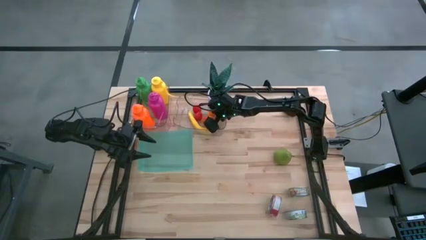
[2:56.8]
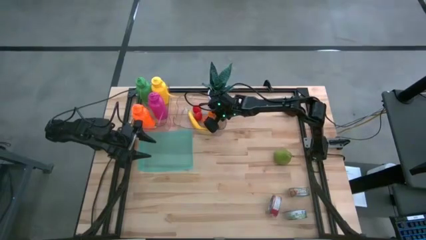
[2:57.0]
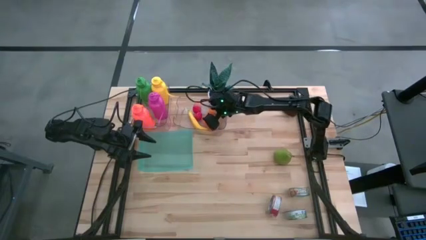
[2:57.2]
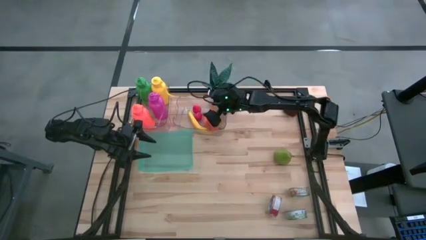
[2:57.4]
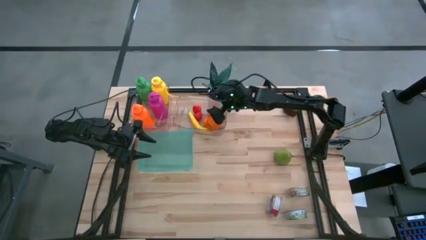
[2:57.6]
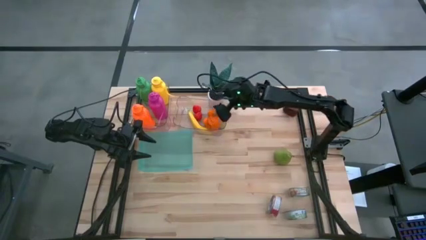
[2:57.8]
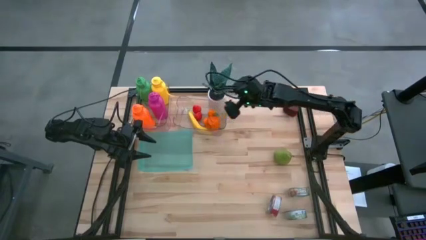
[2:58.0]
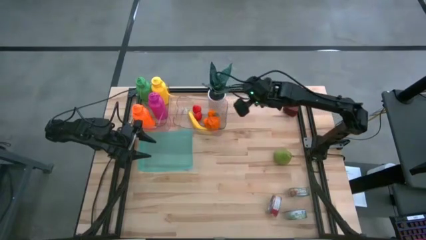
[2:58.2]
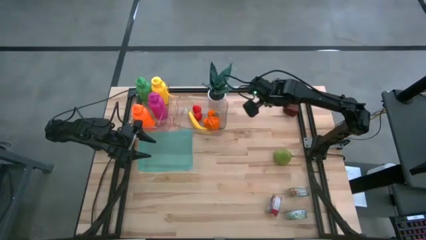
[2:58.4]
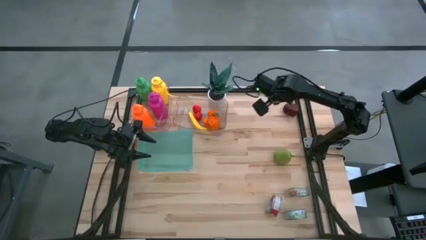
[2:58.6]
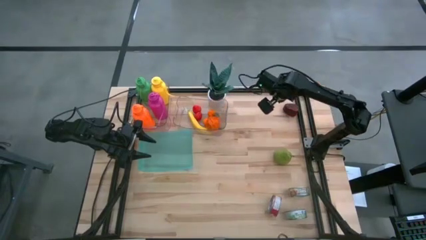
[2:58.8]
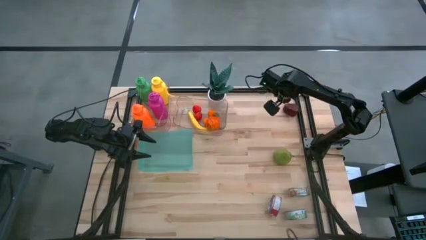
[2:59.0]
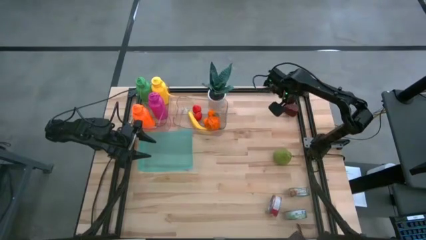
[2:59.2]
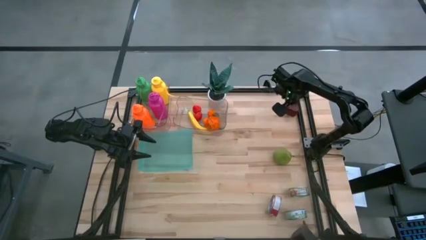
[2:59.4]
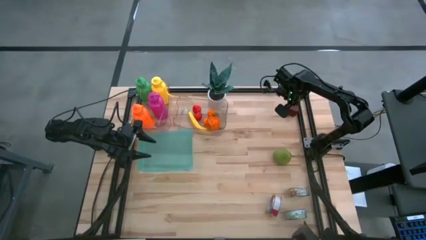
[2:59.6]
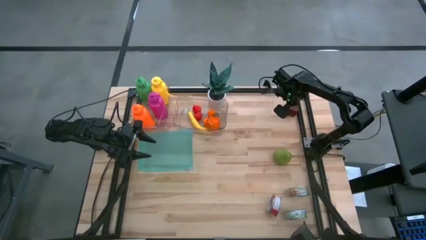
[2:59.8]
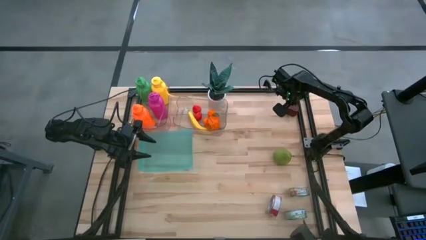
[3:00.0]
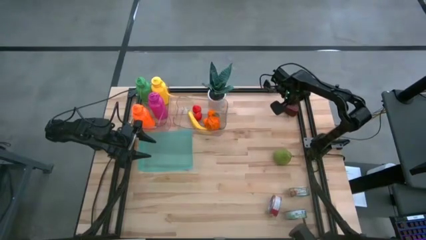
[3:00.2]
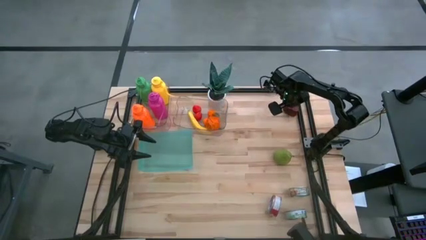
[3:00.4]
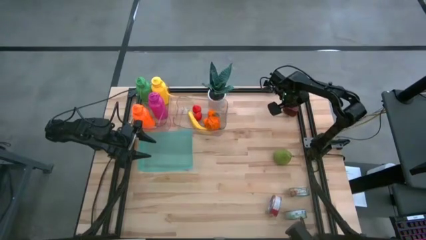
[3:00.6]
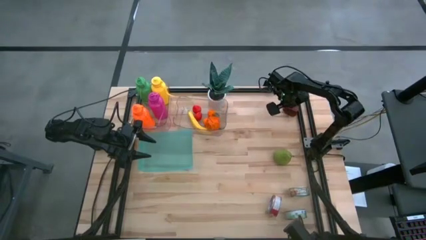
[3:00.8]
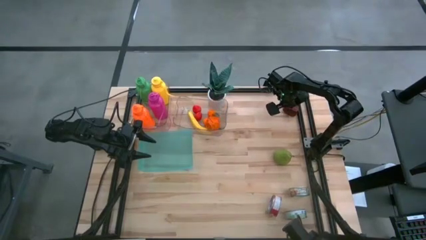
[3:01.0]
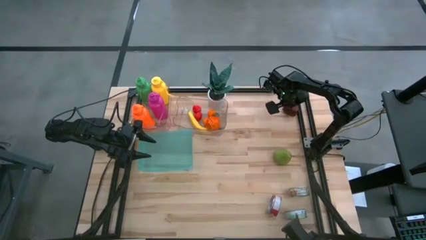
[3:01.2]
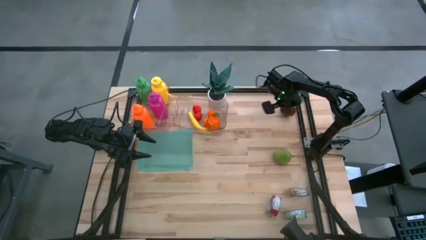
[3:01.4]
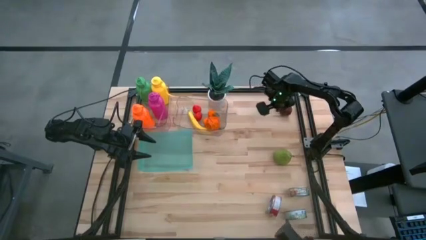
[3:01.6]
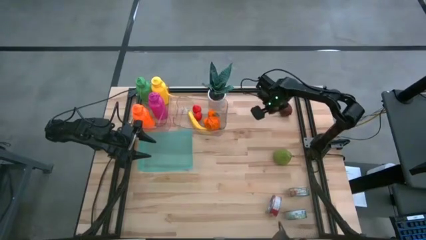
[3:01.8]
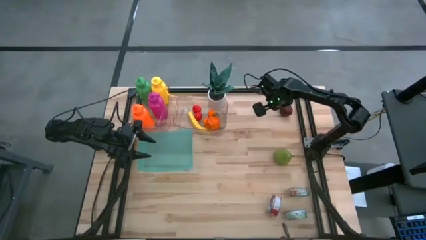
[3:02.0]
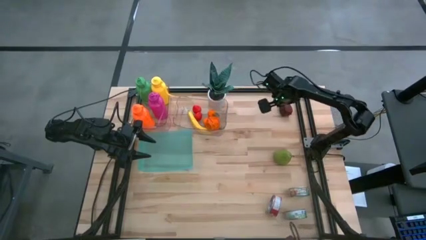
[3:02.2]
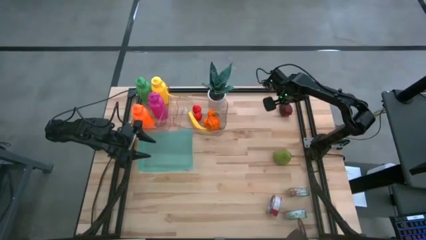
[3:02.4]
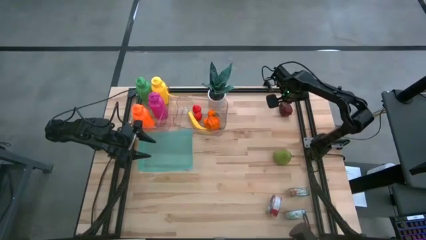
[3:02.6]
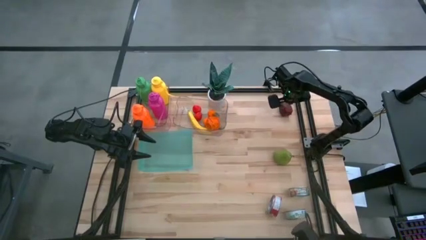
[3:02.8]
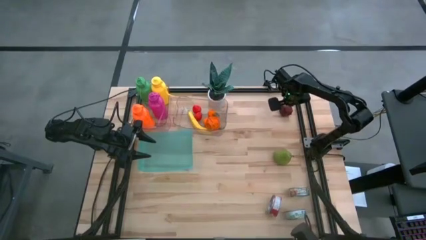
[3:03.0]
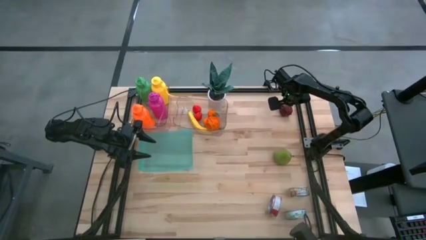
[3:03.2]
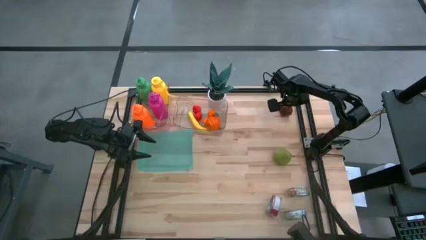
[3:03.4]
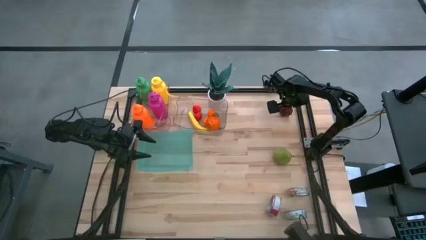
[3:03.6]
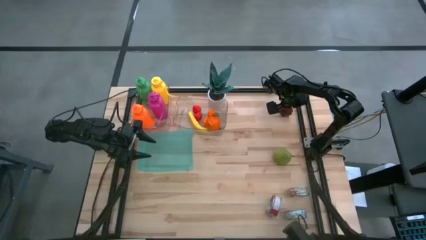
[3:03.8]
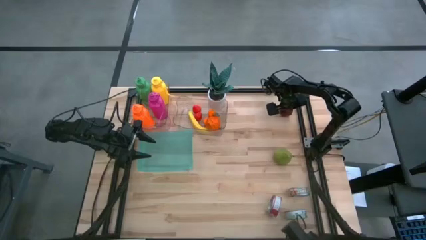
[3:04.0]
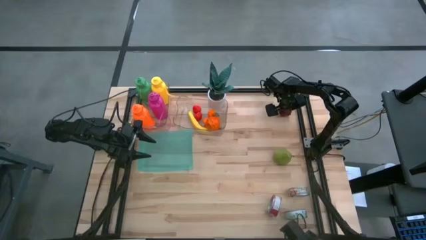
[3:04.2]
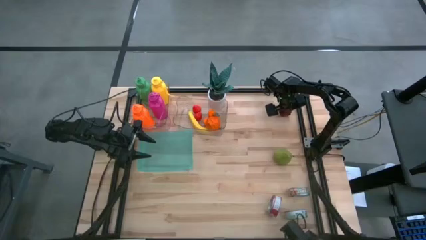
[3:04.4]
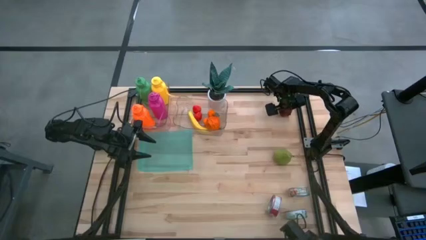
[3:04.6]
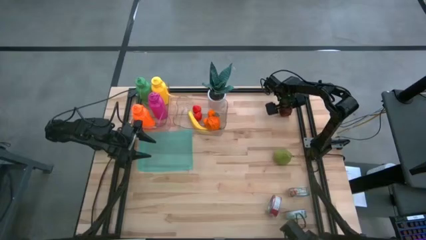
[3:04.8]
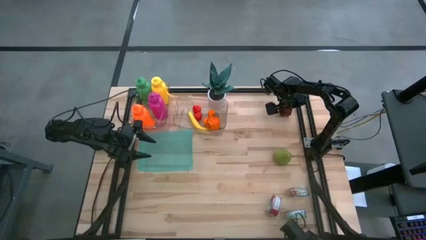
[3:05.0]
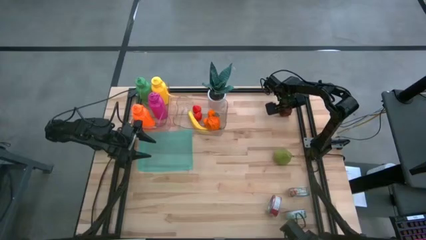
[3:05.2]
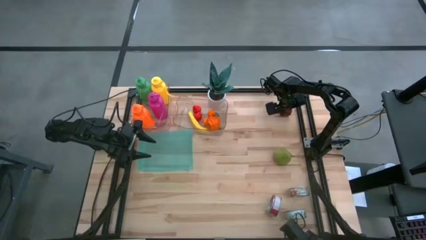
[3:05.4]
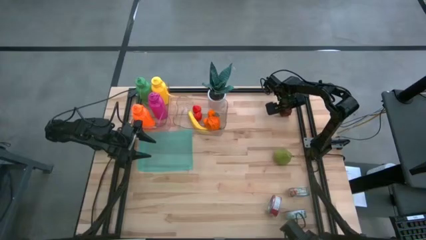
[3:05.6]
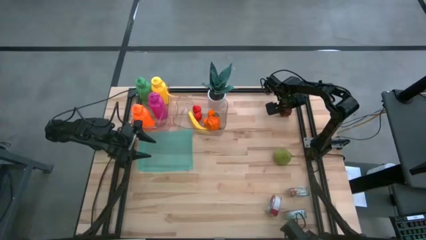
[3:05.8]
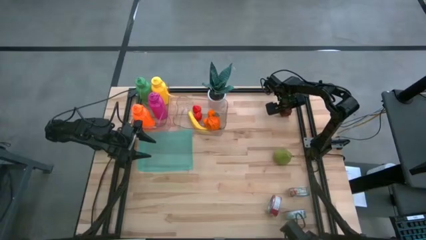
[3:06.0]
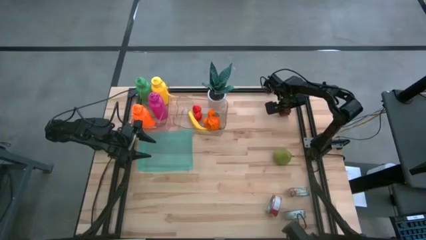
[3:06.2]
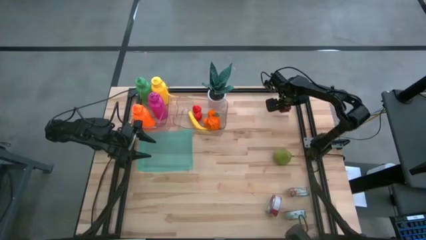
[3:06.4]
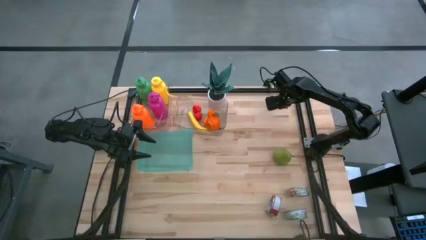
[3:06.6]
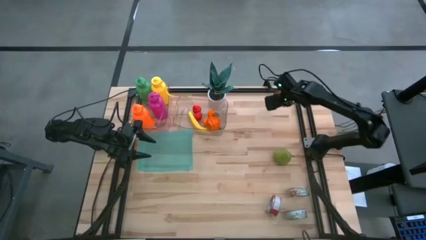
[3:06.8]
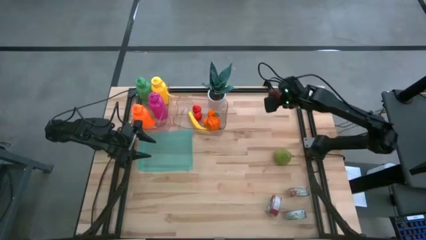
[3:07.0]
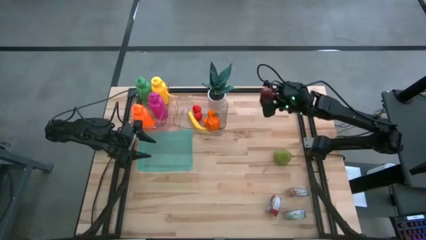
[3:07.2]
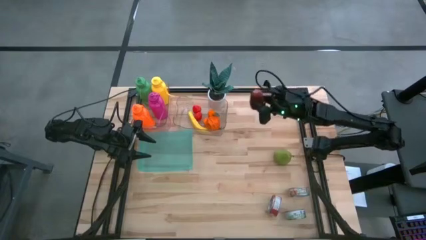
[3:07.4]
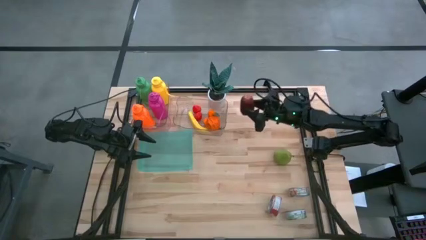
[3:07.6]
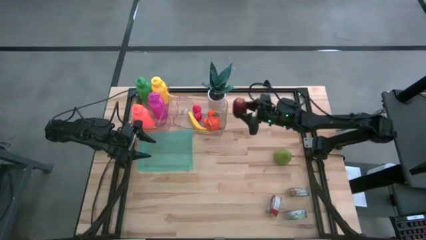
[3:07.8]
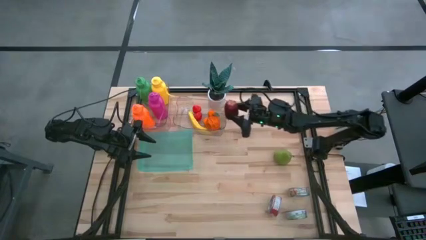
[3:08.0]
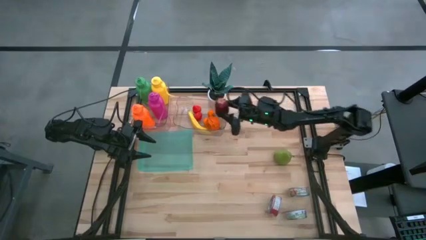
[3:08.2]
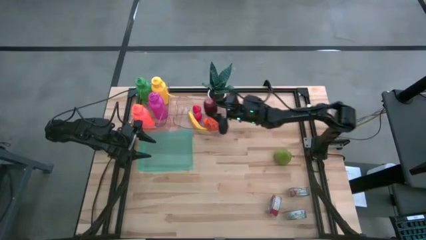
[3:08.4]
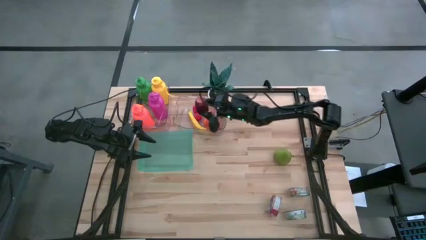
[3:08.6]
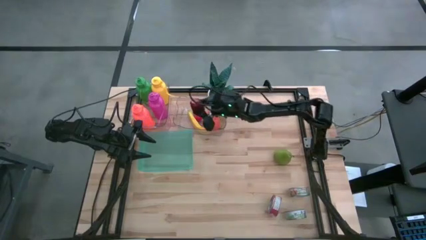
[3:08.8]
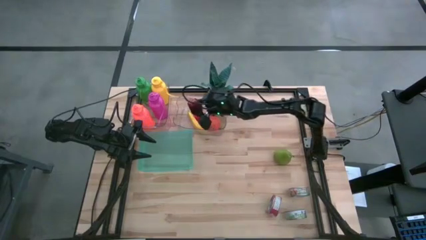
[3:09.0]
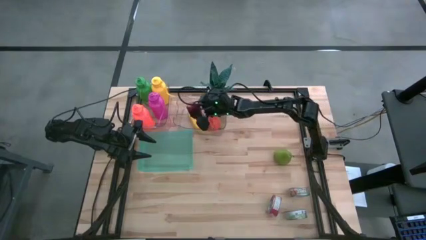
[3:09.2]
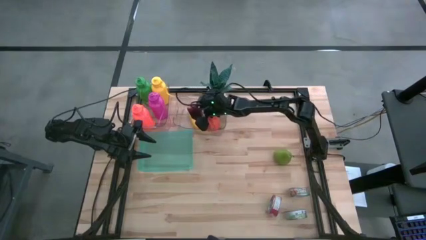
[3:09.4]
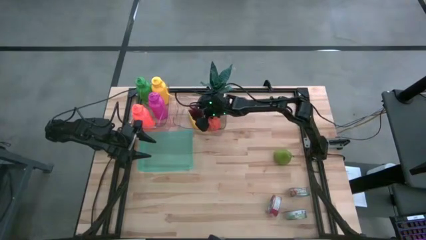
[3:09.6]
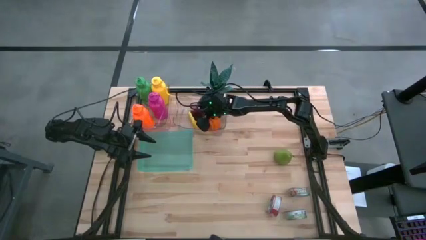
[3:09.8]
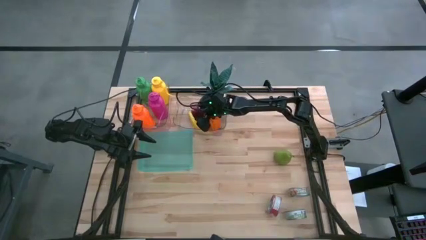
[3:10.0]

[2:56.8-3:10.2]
Task: Pick & Place Food Item
Put the red apple into the right transparent bin

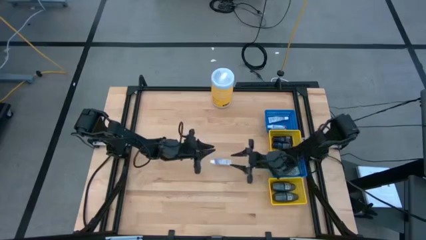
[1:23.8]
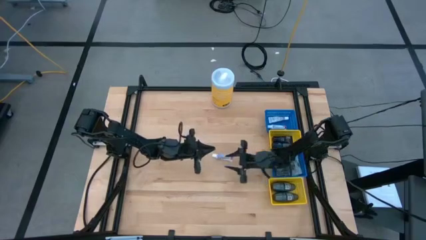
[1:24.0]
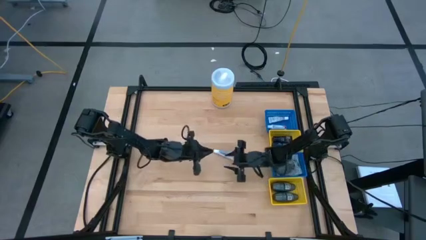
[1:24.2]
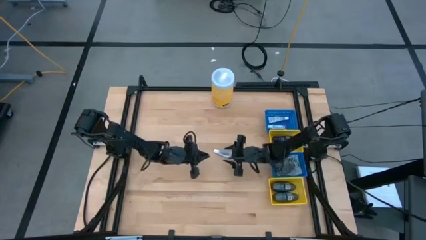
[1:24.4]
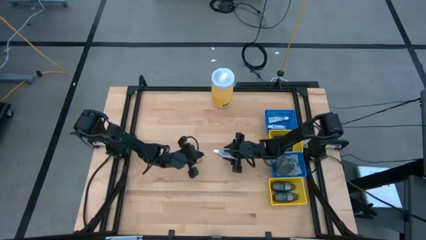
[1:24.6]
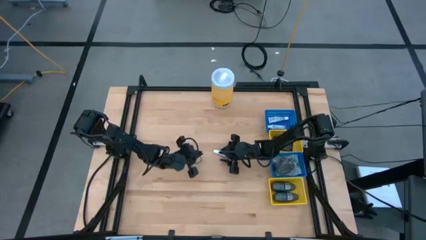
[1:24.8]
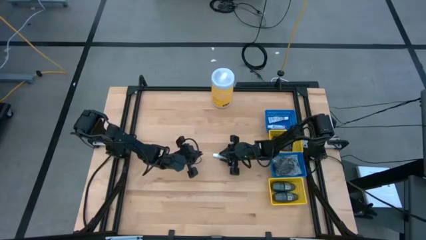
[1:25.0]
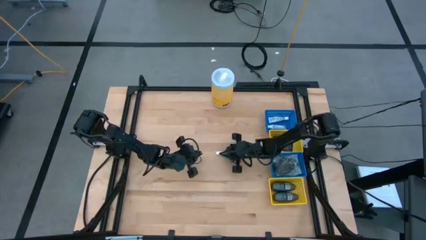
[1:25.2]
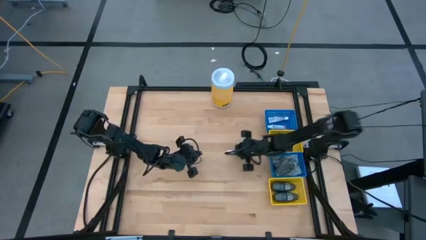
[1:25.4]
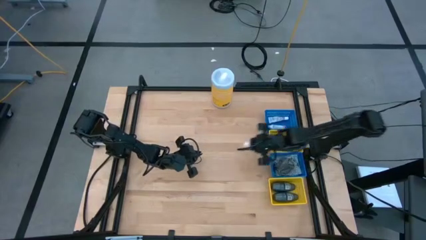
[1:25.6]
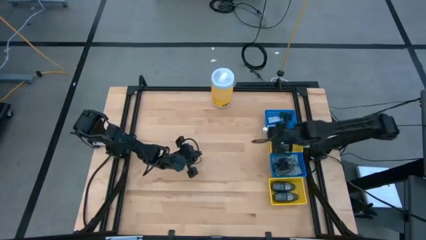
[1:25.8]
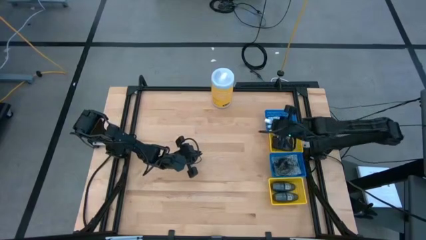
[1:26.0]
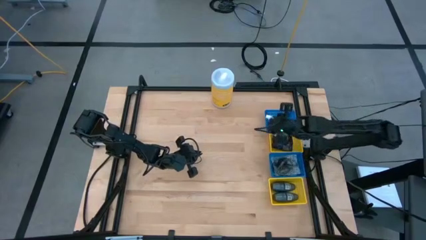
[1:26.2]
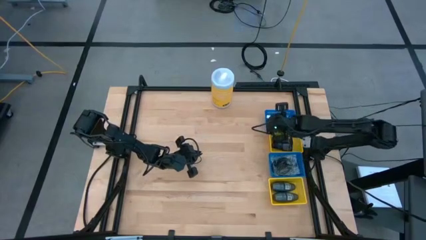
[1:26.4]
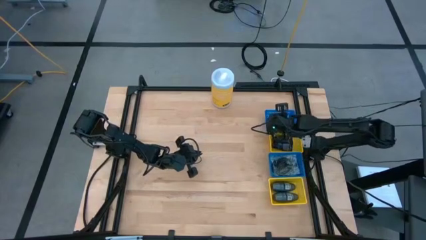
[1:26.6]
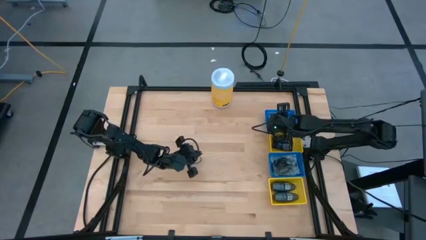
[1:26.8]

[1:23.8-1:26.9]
Task: Pick & Place Travel size toiletries
Put the white toothpaste into the top blue bin
